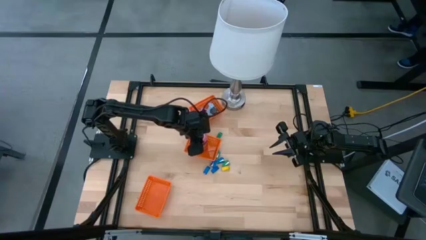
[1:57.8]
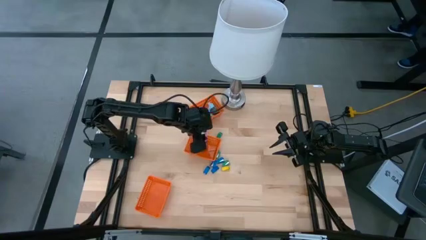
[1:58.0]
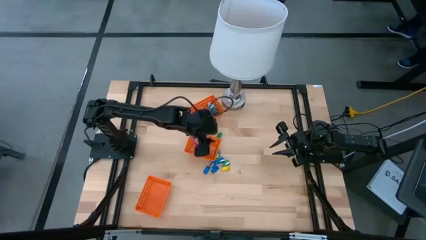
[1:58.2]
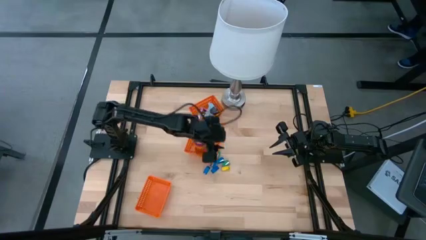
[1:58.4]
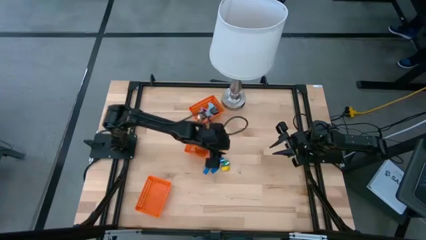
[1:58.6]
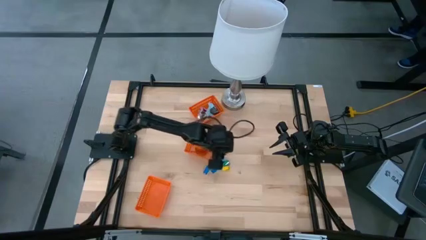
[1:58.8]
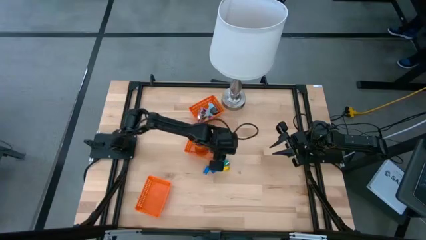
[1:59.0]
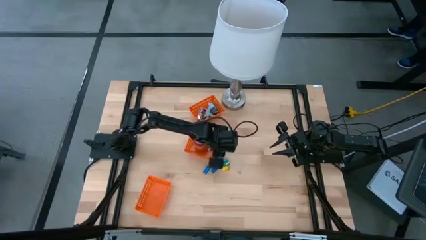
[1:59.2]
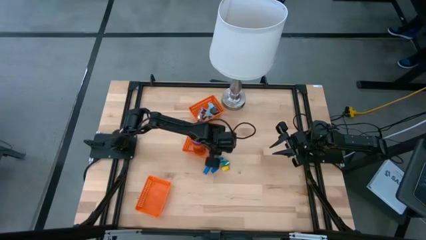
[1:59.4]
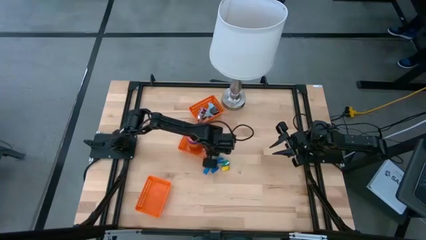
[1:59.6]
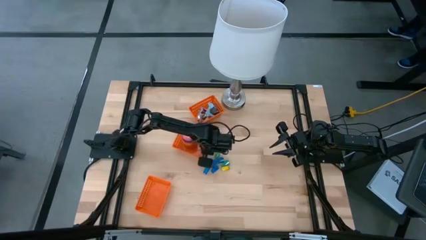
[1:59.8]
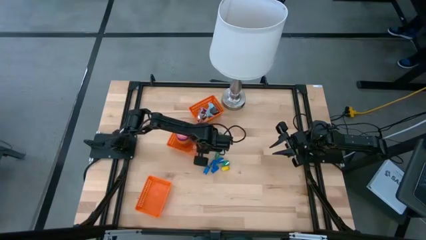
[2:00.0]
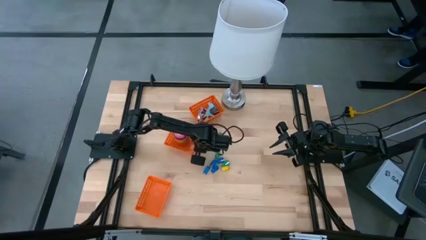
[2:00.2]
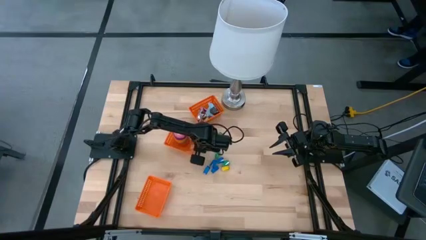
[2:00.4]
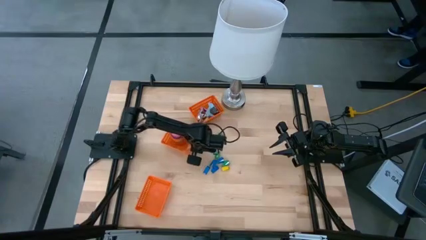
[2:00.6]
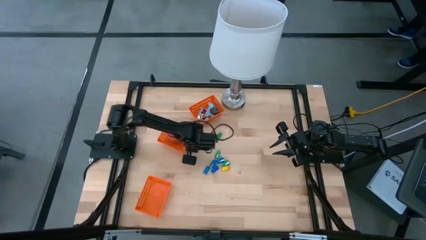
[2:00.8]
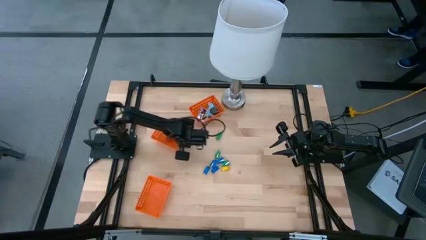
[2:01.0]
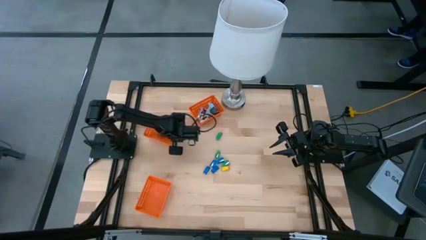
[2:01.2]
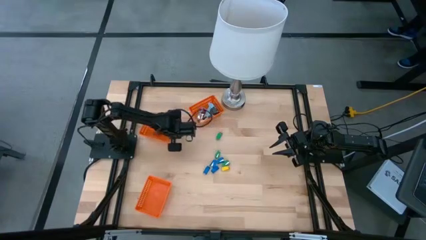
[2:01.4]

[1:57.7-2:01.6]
Task: Pick and place Stapler, Stapler remover, tape
Adjust the middle orange bin

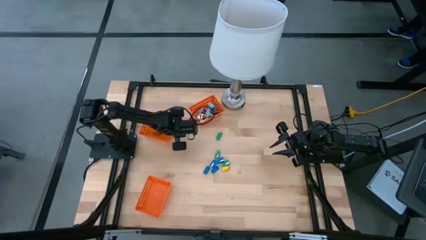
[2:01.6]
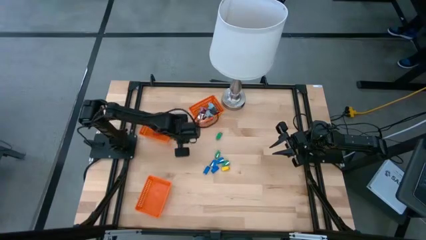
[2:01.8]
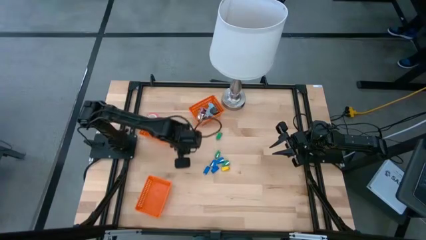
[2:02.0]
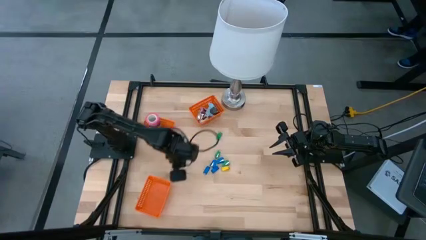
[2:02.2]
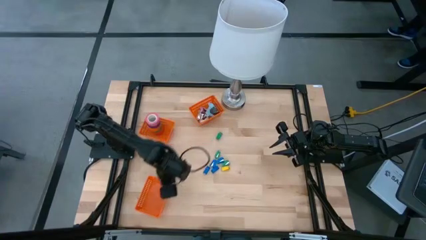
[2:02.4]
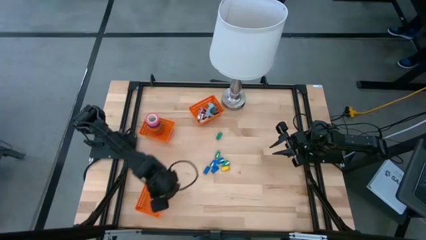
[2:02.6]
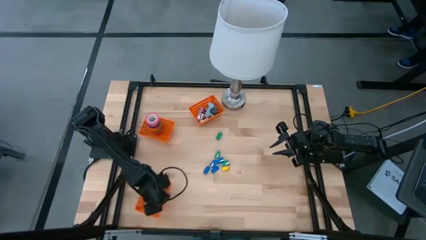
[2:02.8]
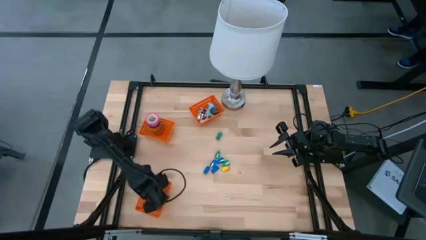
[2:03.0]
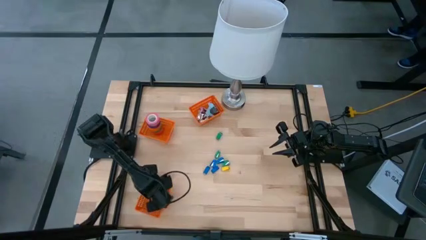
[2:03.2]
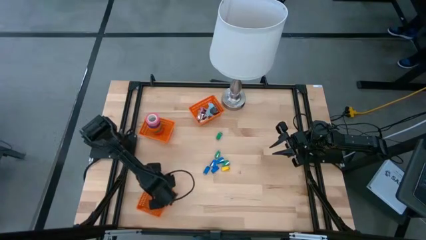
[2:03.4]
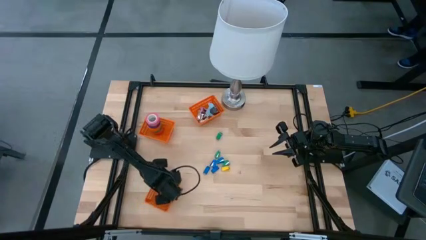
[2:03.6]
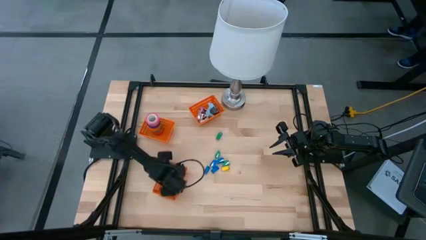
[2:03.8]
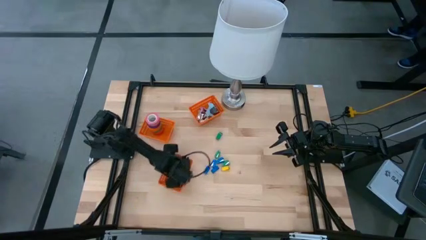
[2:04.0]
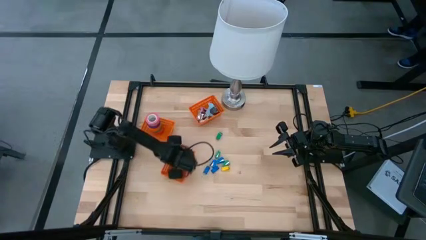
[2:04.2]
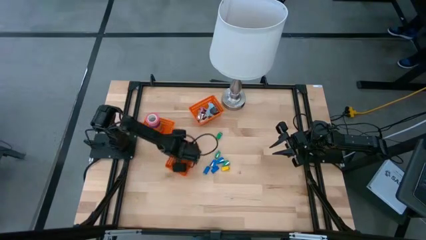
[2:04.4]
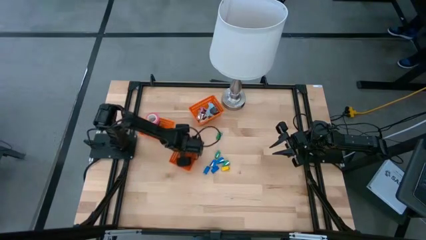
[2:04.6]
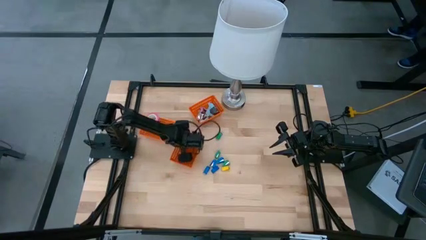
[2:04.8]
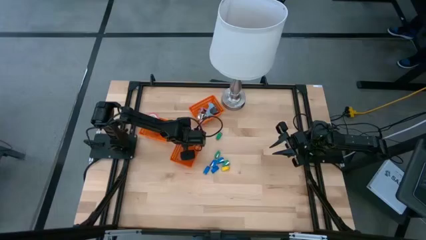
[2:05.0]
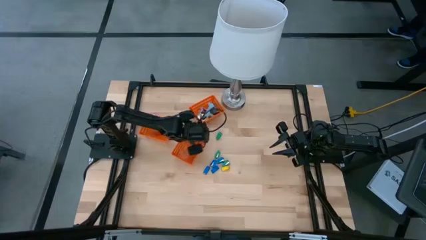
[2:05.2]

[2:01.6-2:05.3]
Move the bottom orange bin to the middle of the table

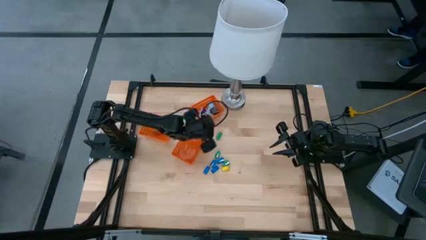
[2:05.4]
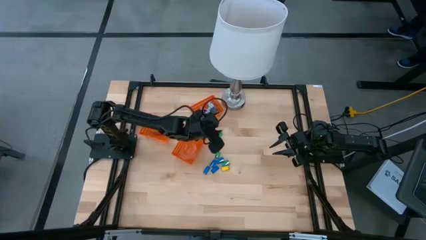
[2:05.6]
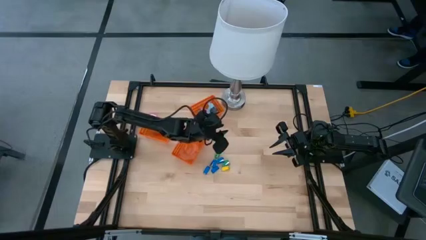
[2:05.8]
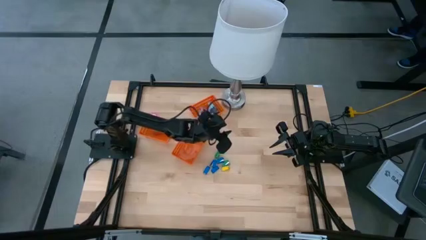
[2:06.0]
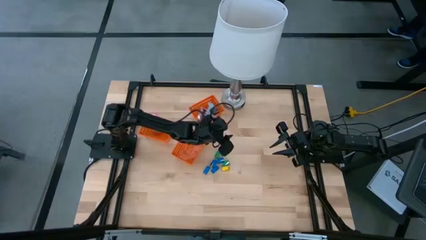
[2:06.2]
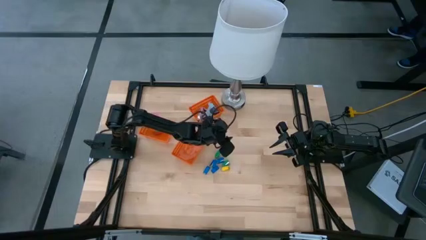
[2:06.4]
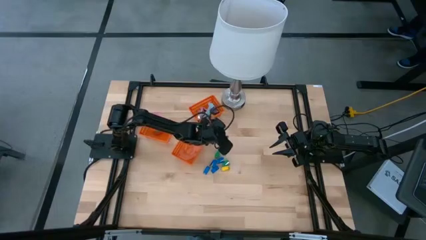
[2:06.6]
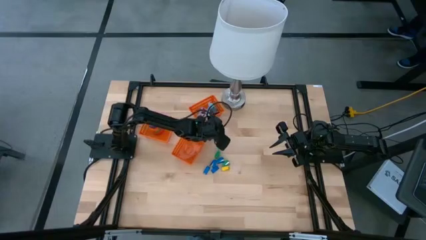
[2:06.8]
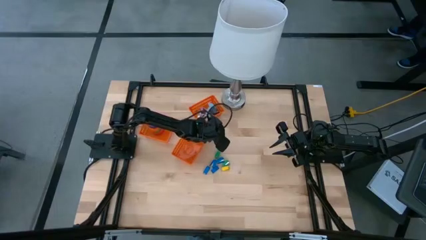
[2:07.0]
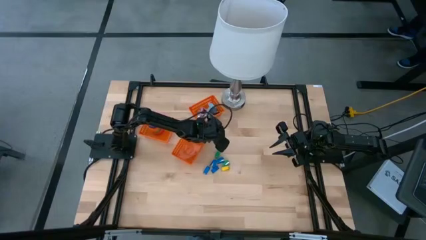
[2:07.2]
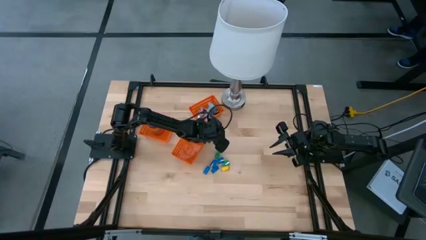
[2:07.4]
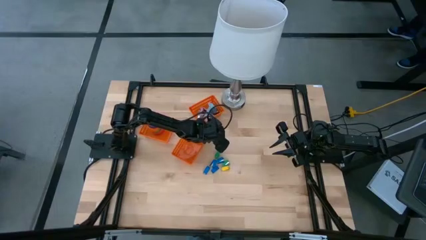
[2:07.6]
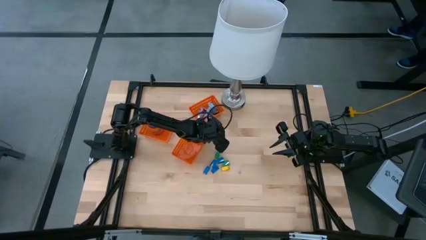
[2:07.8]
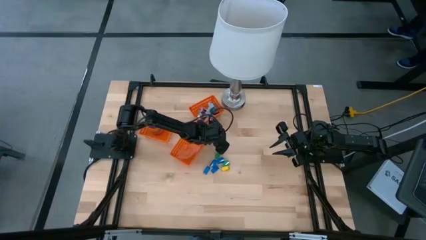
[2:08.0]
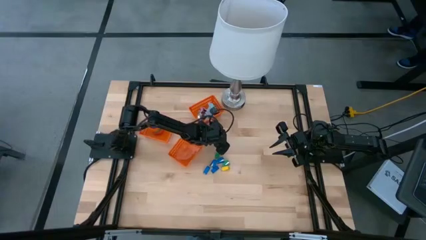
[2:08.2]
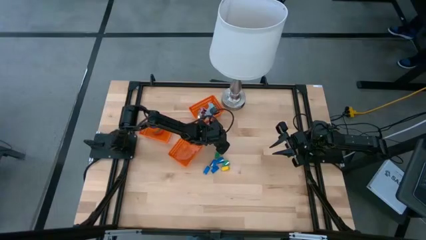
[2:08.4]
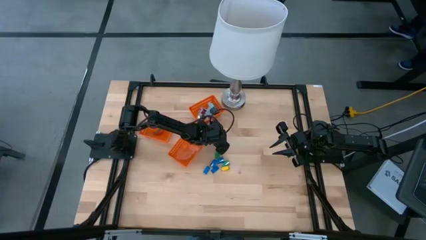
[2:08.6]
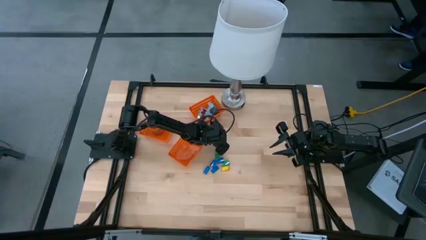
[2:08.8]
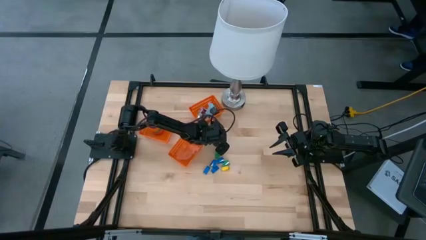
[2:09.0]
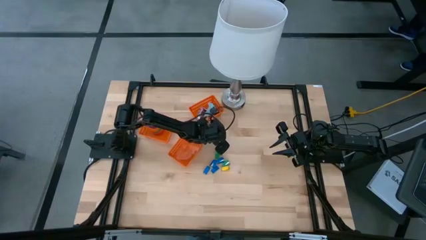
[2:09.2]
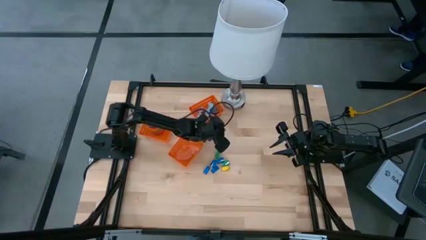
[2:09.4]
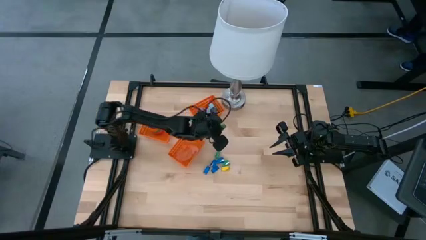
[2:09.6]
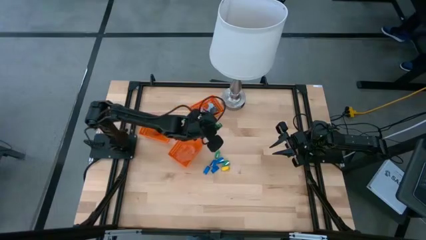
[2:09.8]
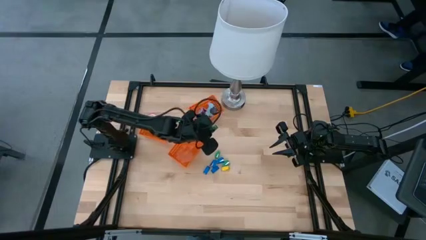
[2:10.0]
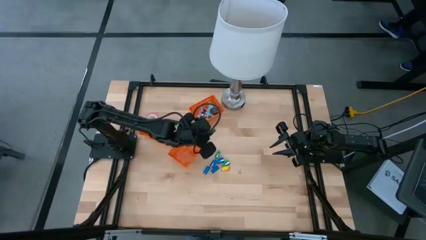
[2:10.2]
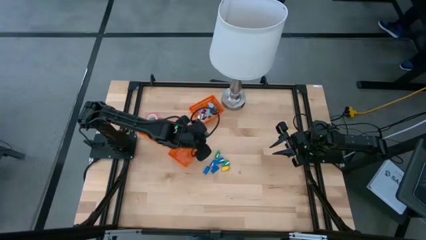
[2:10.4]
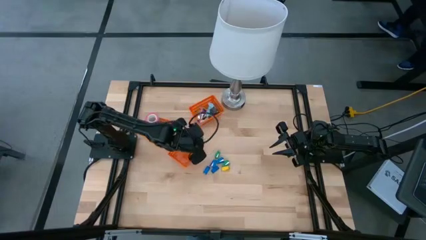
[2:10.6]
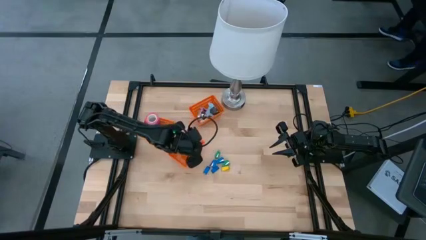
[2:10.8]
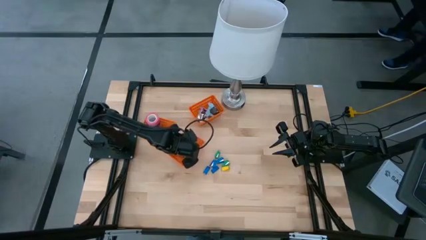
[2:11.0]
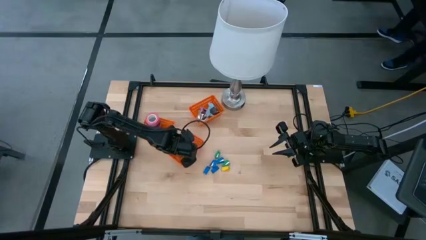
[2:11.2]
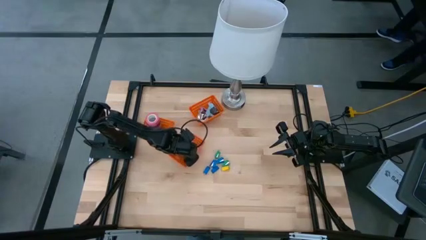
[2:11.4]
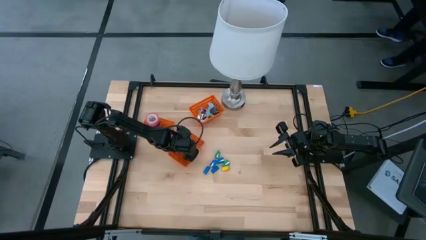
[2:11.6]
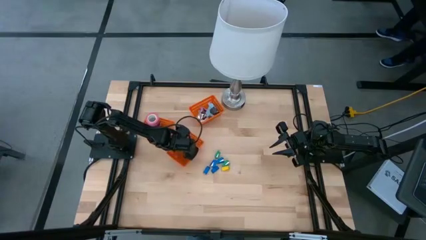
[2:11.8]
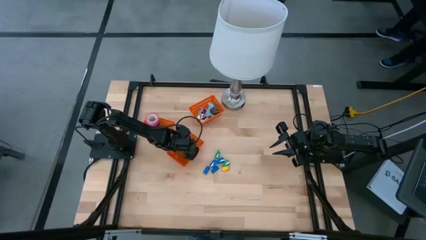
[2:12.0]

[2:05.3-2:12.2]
Put the green stapler into the bottom orange bin

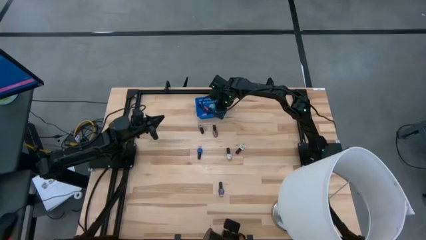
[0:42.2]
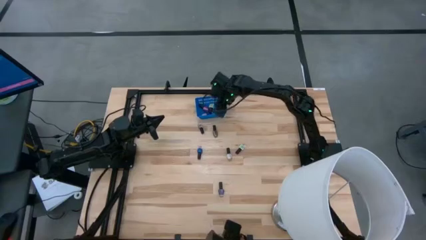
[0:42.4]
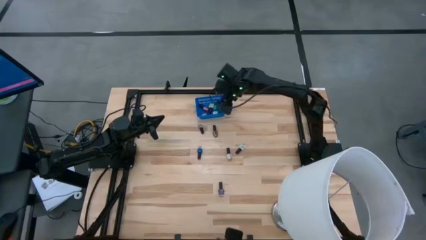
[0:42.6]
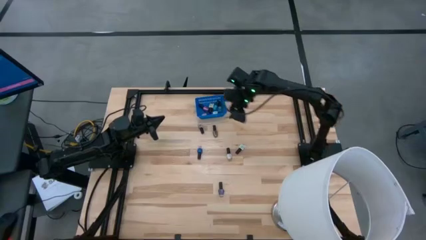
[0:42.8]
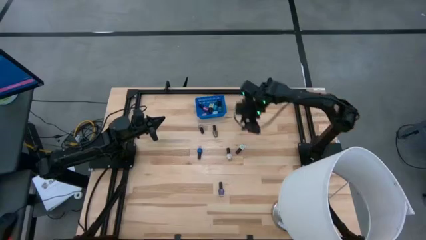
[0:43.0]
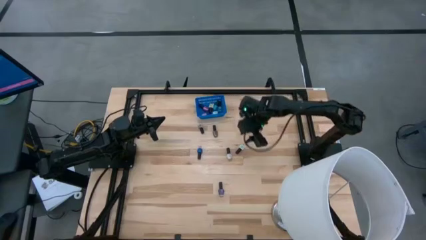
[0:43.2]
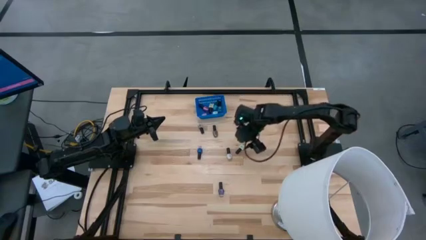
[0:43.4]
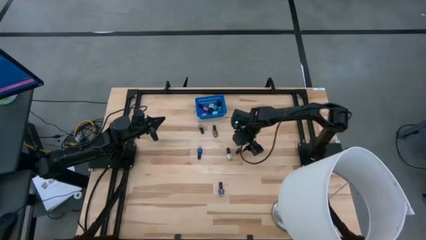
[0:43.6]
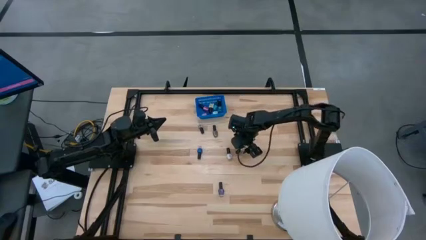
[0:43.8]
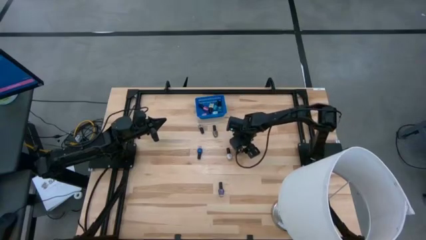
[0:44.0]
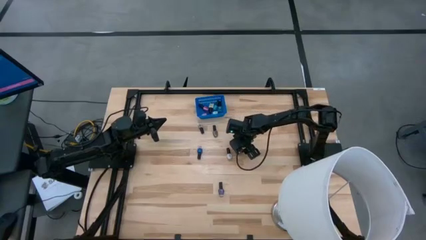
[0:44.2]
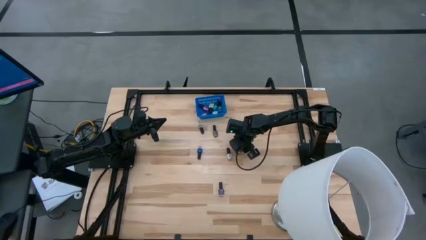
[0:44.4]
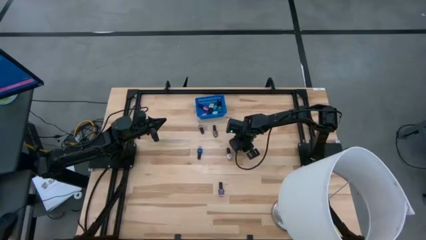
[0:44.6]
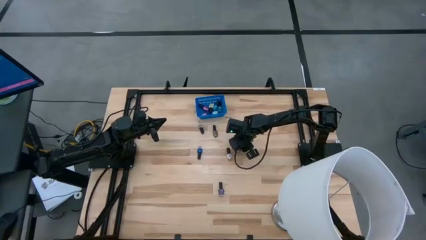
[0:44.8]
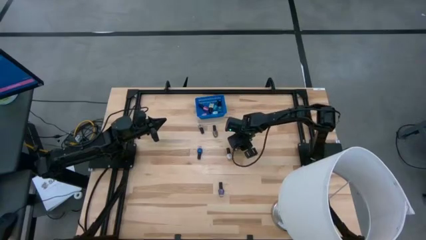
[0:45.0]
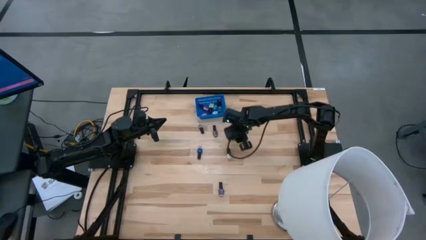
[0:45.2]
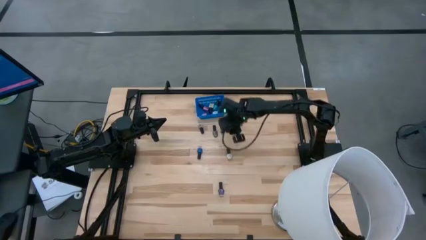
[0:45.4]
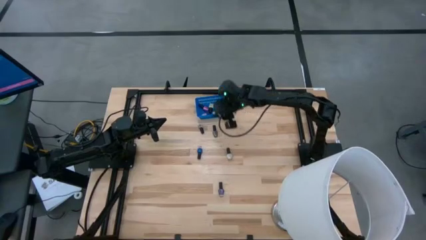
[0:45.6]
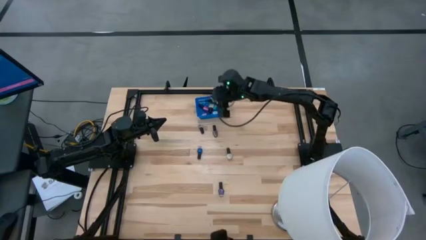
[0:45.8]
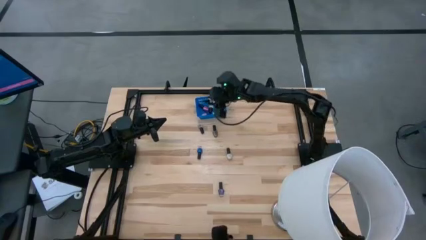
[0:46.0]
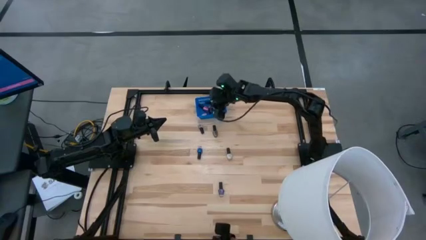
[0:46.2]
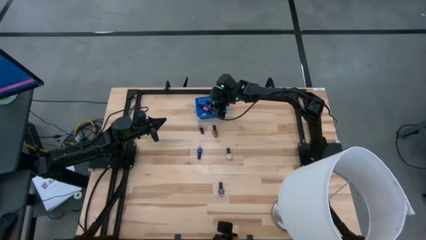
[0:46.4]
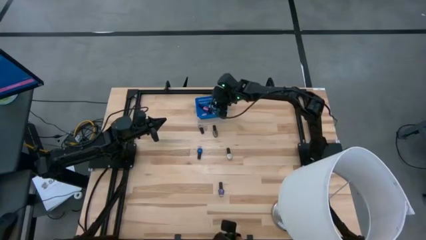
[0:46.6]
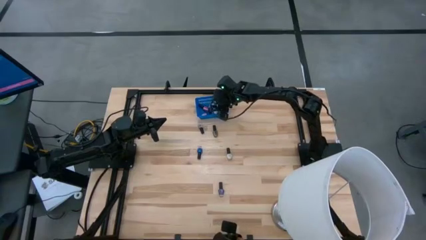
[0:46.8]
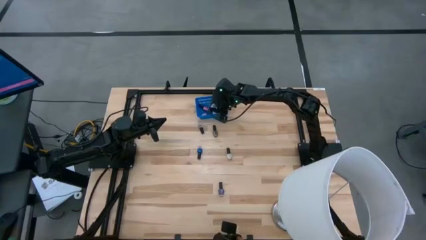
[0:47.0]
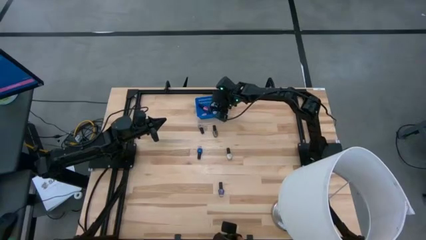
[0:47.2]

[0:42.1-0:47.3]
Task: Pick & Place Nail Polish
Put the light green nail polish bottle into the blue basket
